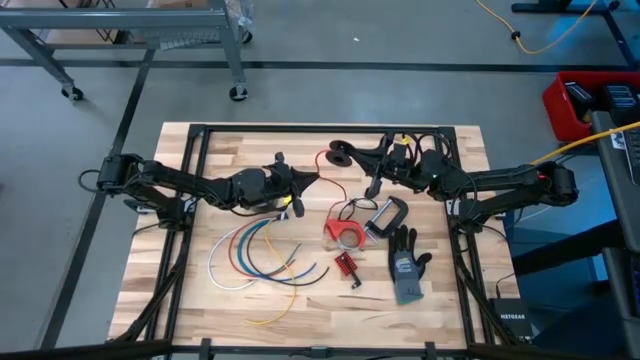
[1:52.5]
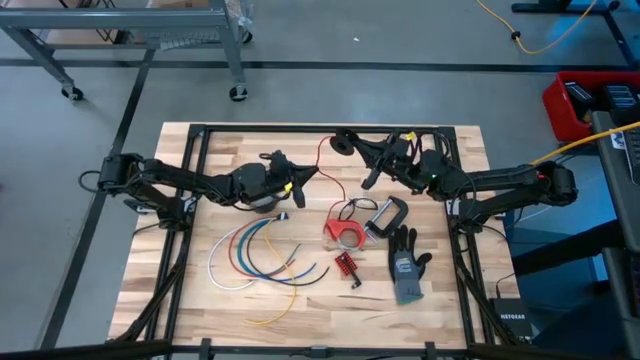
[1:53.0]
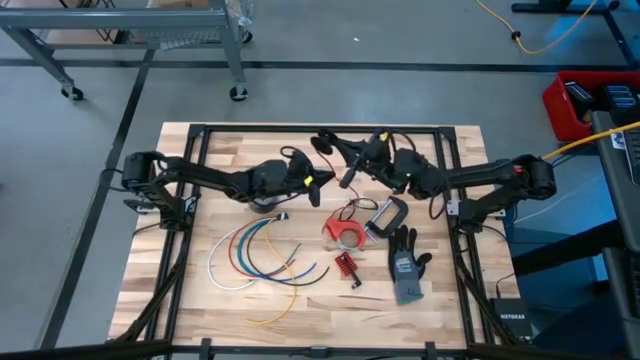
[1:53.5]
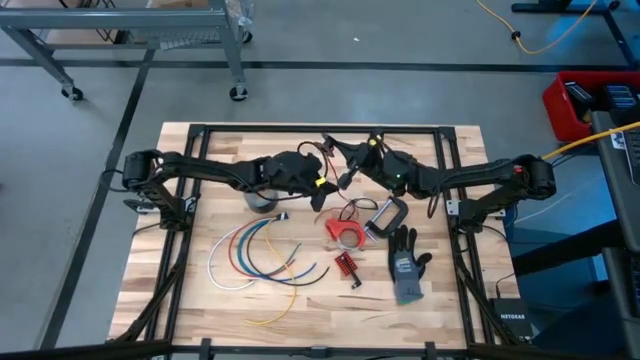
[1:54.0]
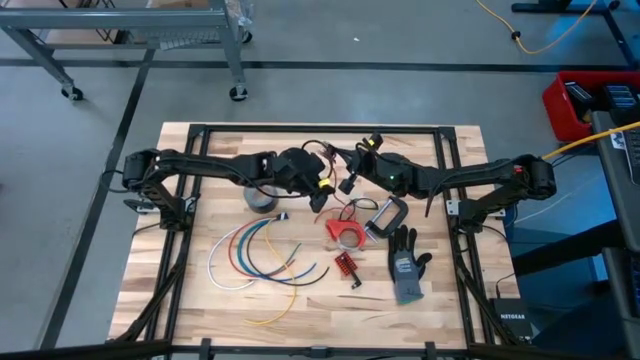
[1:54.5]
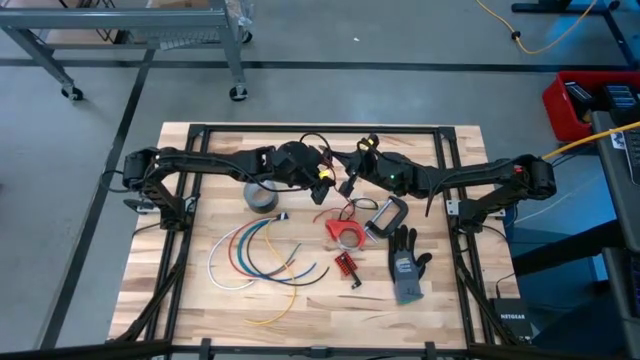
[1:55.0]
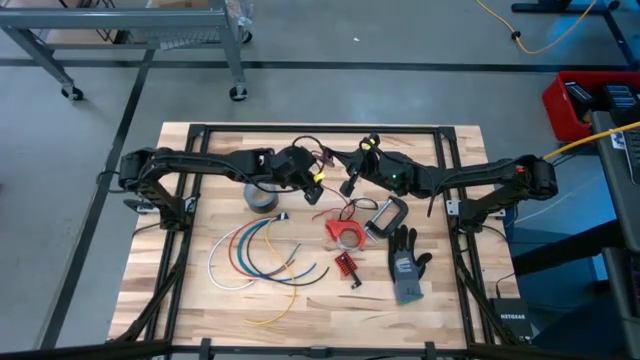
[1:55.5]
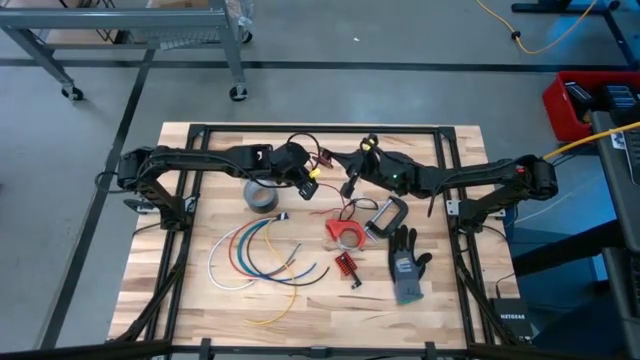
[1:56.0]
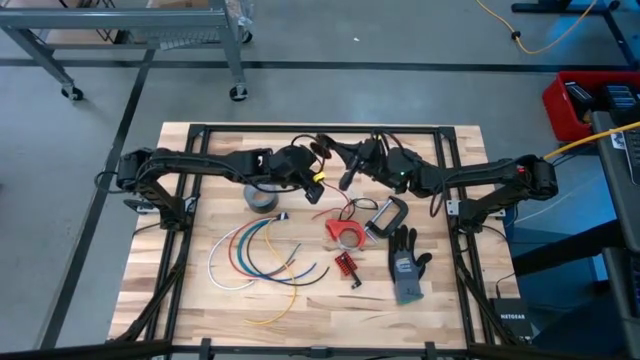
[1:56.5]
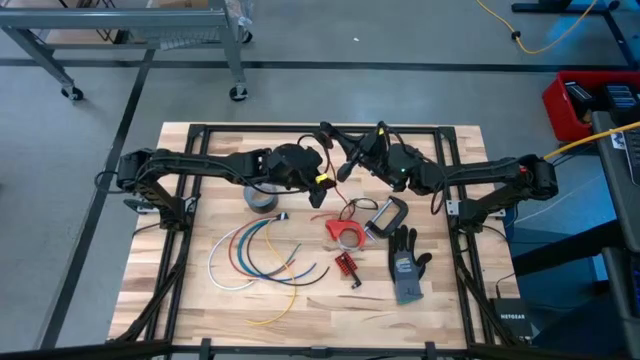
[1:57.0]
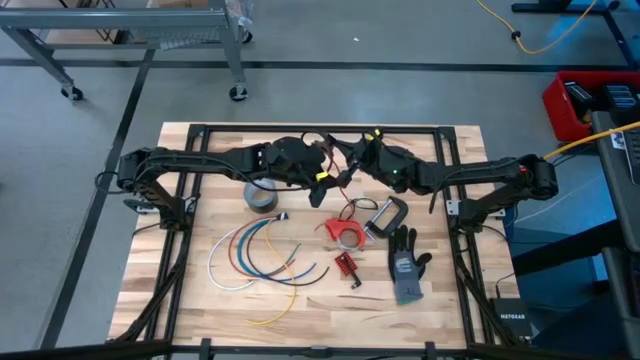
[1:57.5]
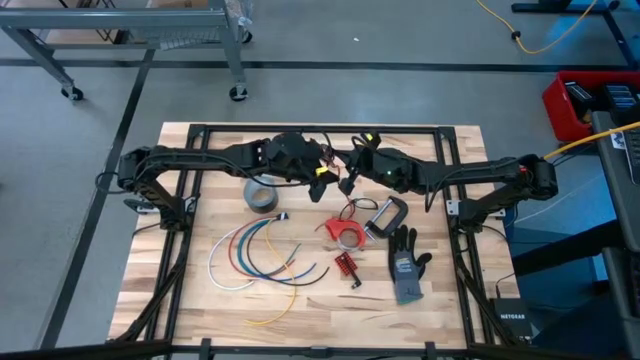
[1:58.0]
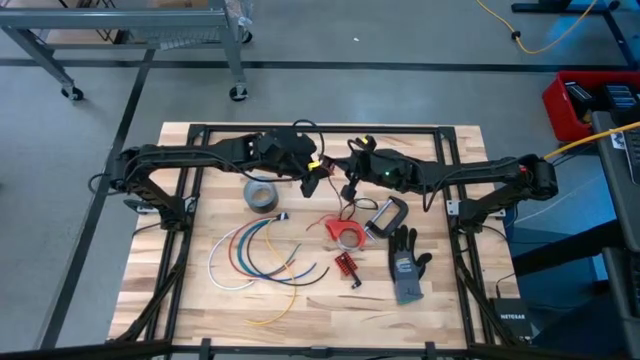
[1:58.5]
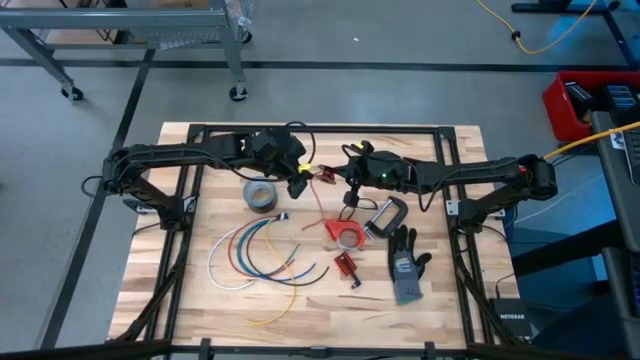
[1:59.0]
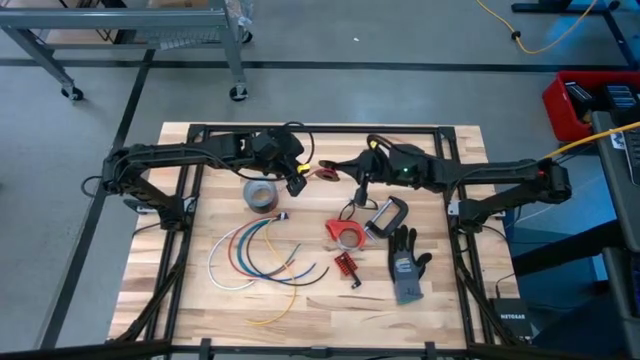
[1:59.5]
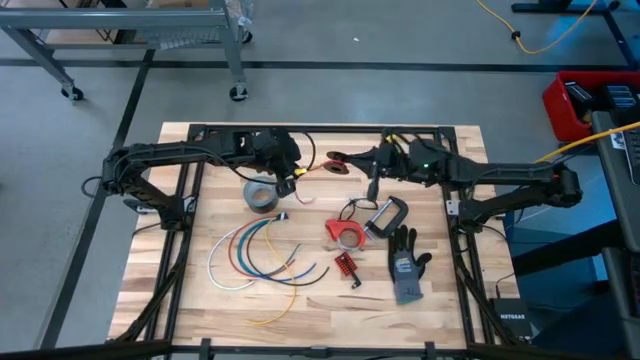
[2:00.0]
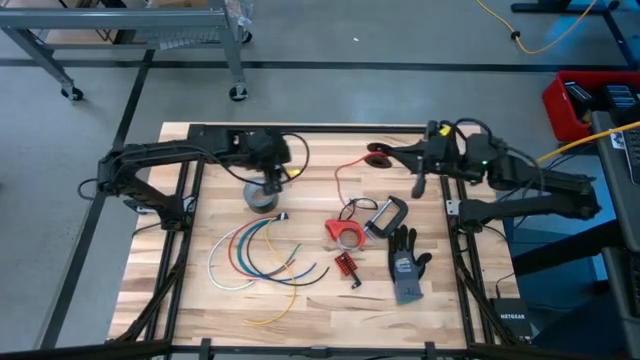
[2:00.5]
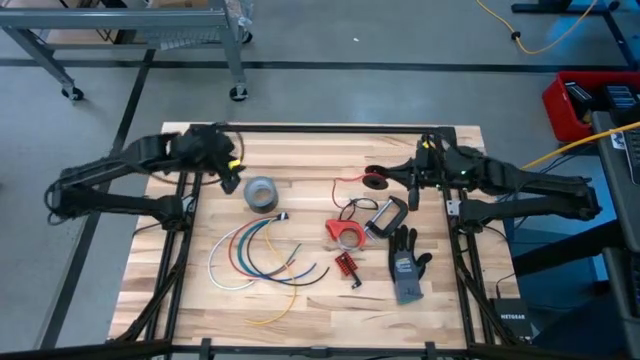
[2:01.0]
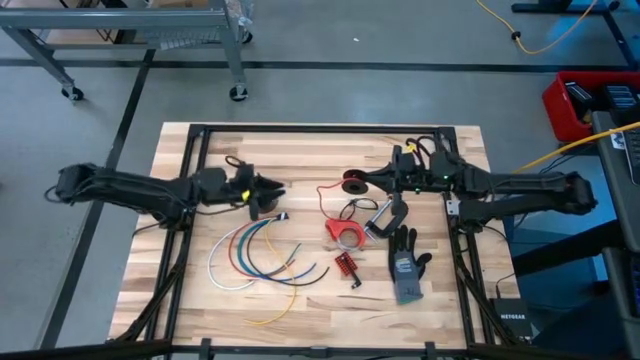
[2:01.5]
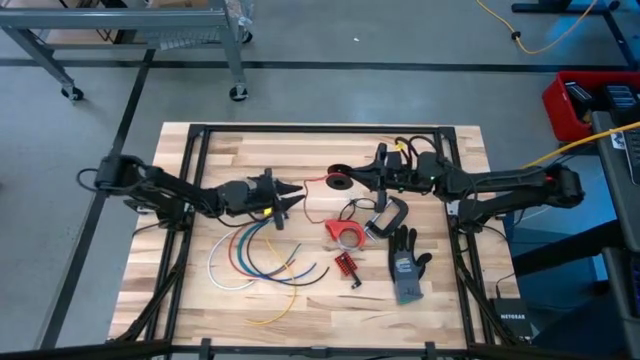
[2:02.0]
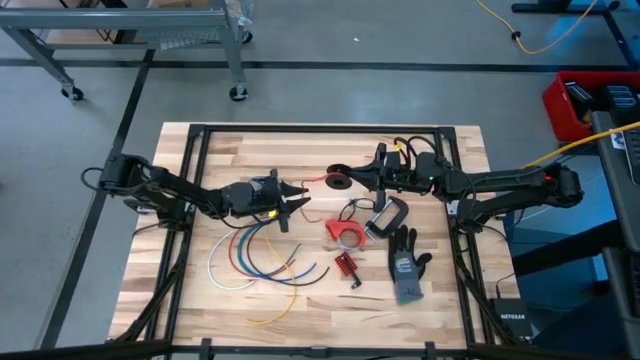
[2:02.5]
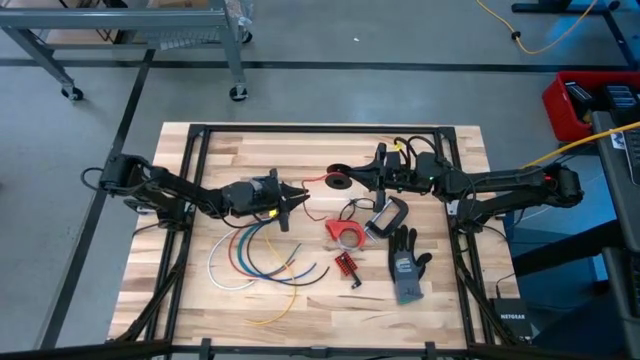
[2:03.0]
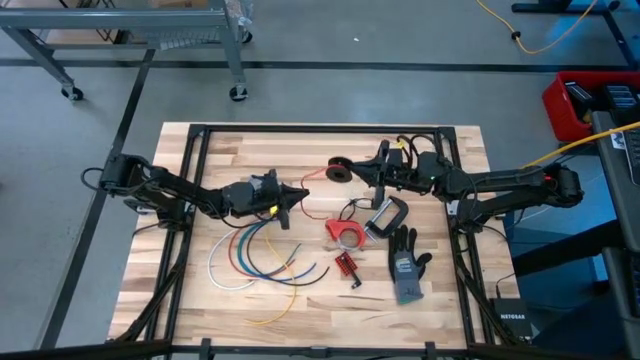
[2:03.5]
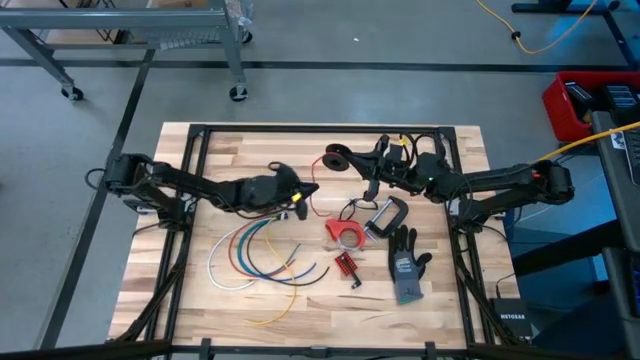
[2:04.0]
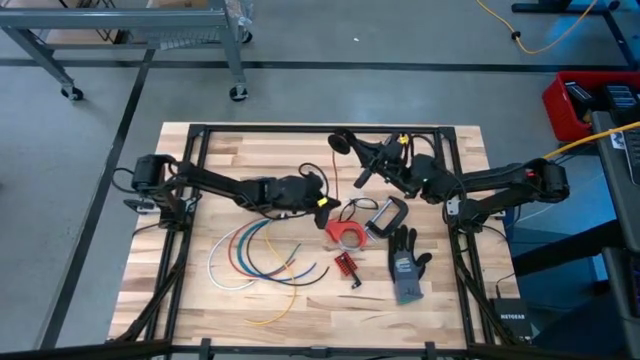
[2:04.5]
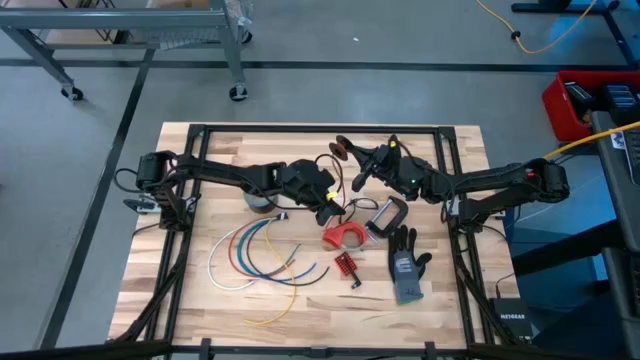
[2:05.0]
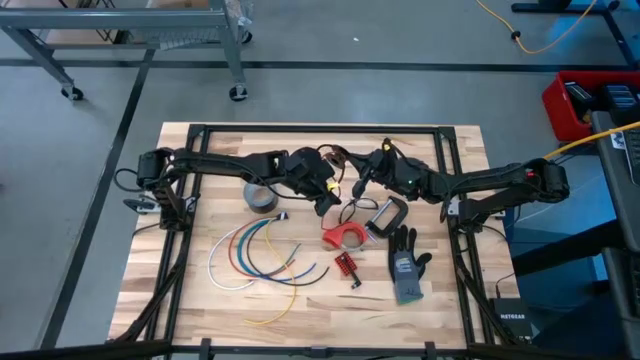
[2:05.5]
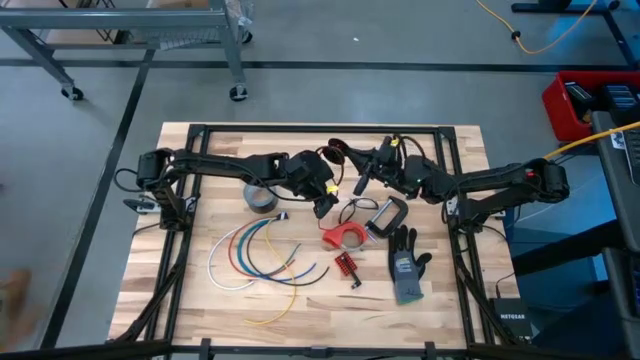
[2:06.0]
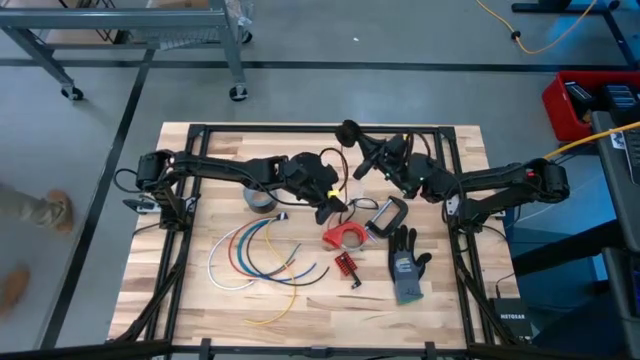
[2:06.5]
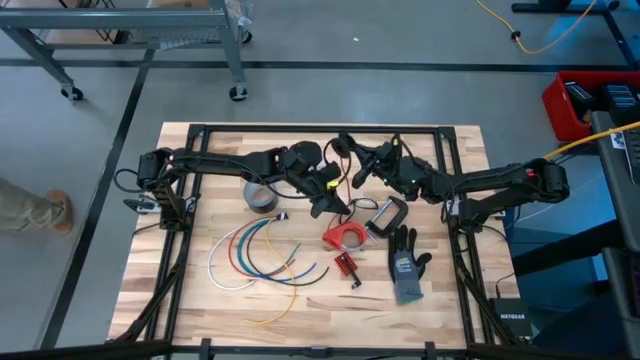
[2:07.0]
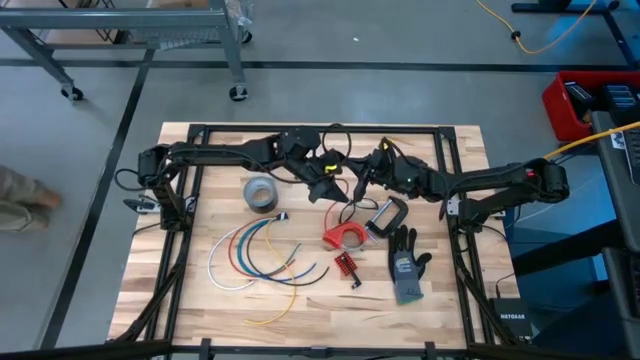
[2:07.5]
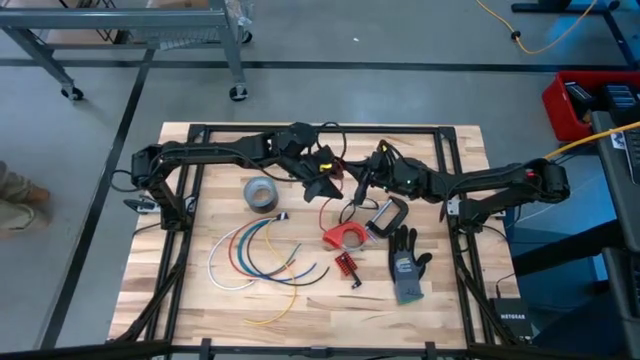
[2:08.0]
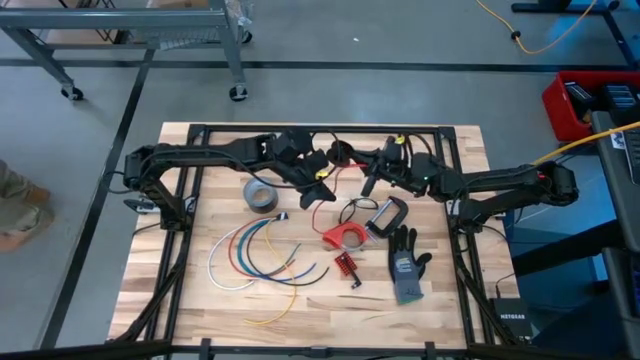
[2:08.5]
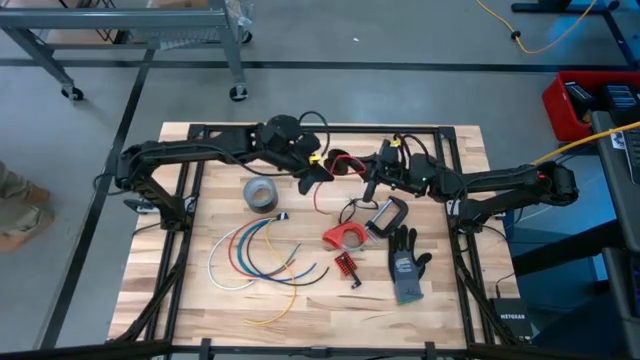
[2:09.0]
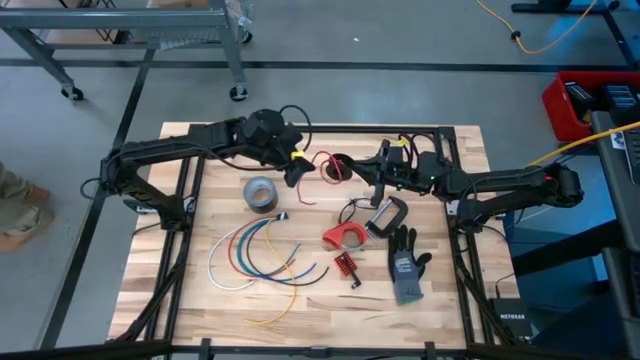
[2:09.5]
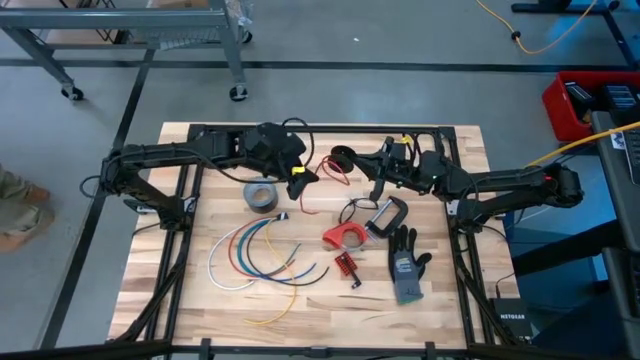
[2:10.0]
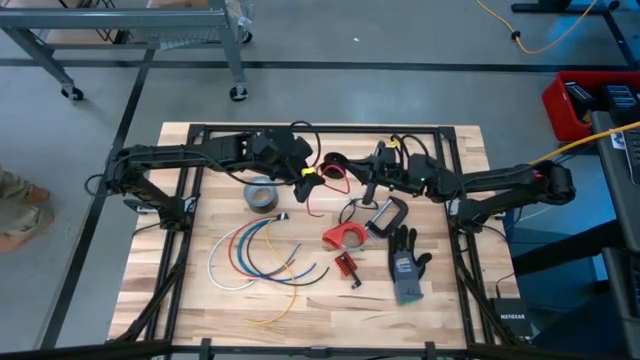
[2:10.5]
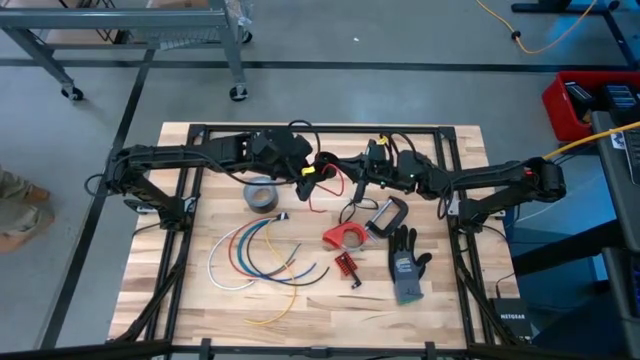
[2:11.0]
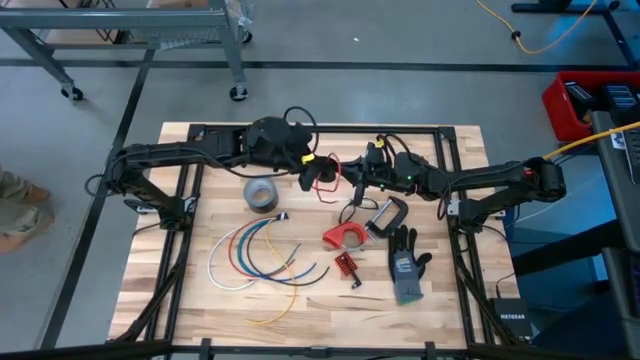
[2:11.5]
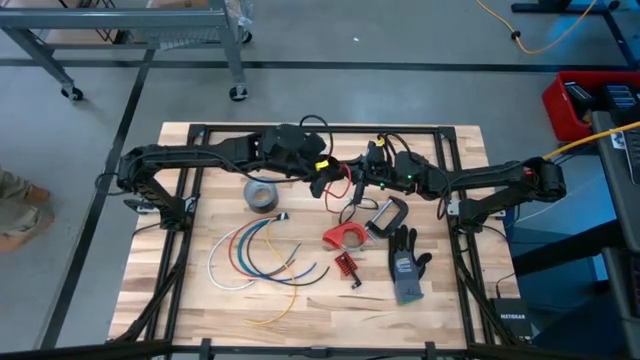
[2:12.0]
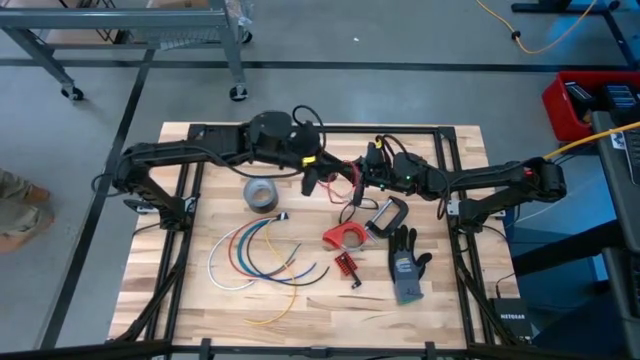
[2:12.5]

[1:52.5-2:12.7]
Task: Coil cords
Coil the red wire onto the spool
